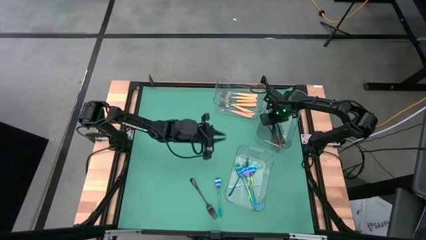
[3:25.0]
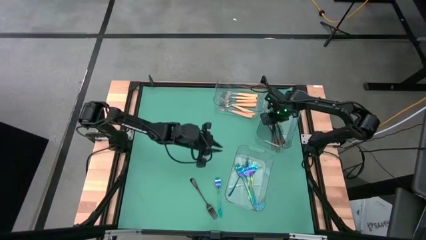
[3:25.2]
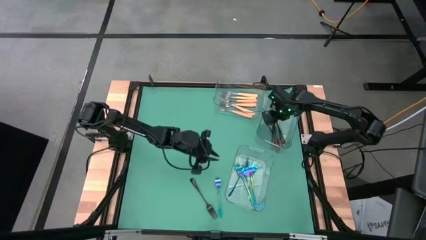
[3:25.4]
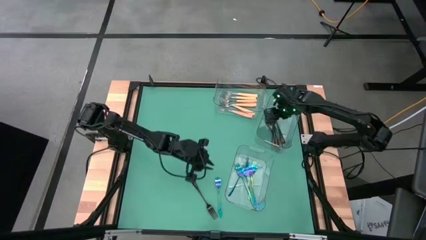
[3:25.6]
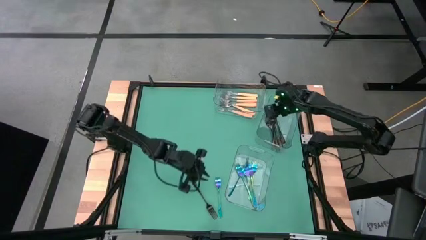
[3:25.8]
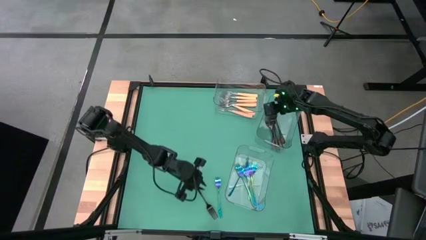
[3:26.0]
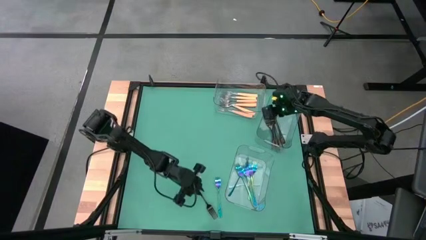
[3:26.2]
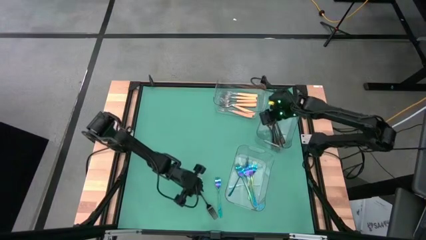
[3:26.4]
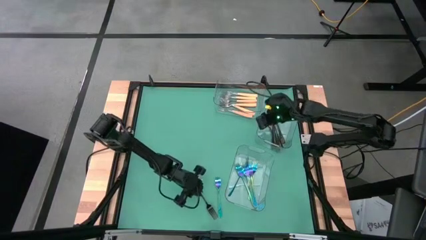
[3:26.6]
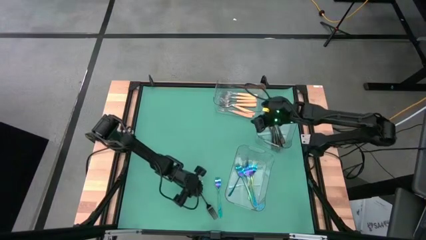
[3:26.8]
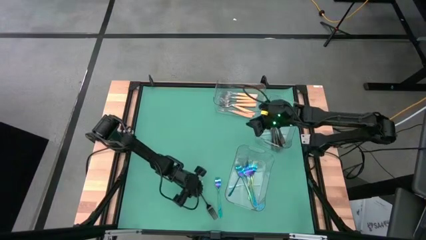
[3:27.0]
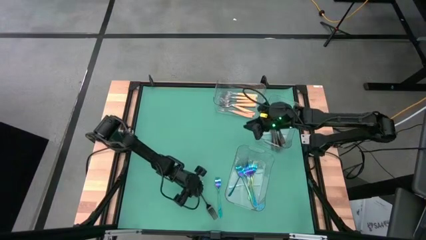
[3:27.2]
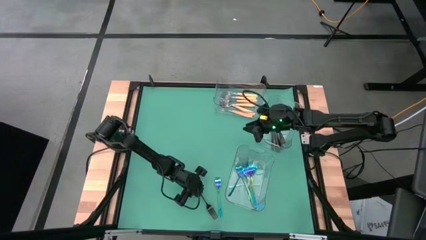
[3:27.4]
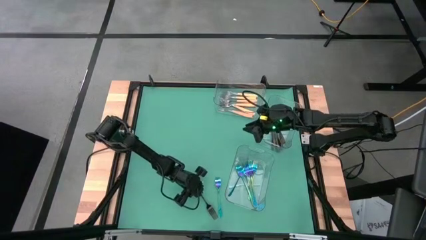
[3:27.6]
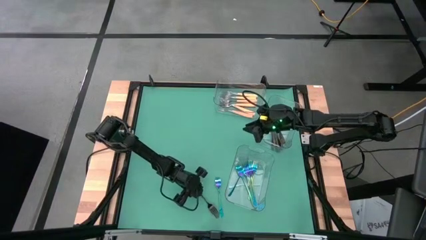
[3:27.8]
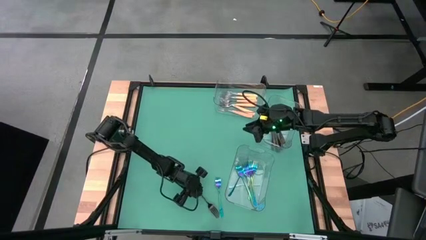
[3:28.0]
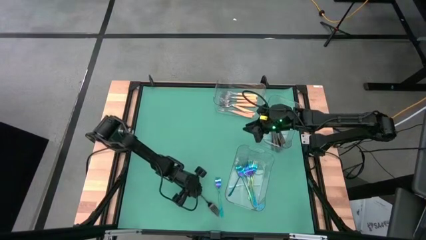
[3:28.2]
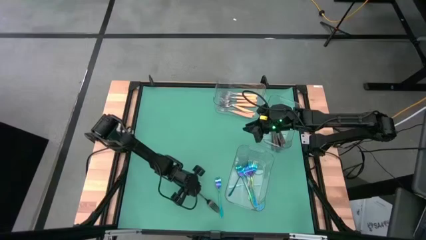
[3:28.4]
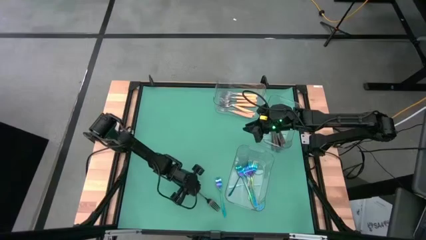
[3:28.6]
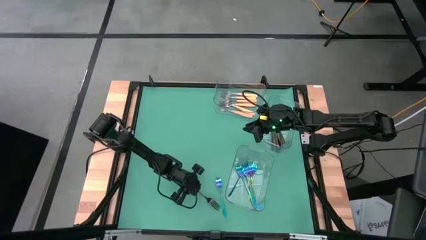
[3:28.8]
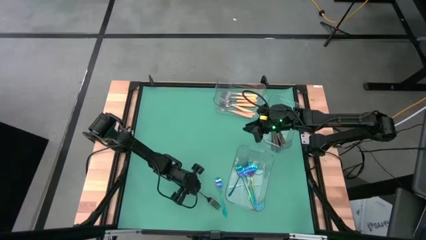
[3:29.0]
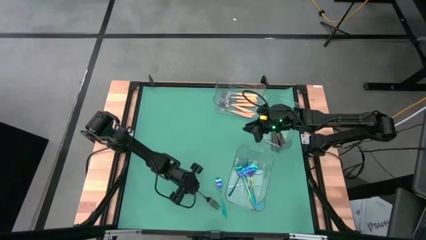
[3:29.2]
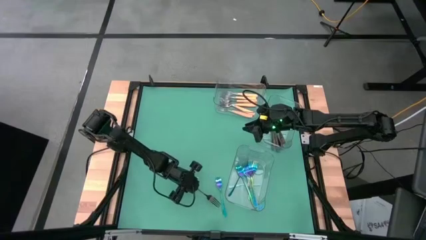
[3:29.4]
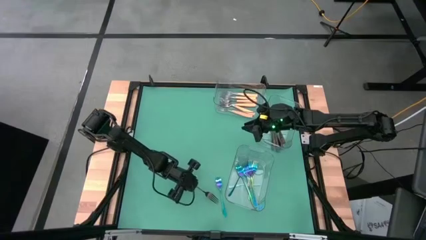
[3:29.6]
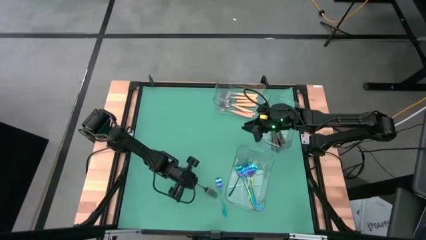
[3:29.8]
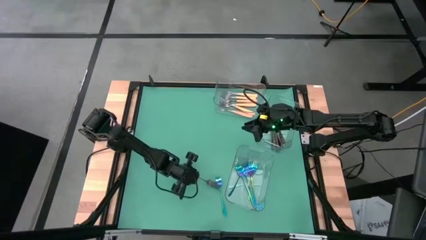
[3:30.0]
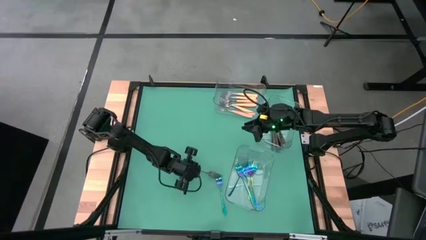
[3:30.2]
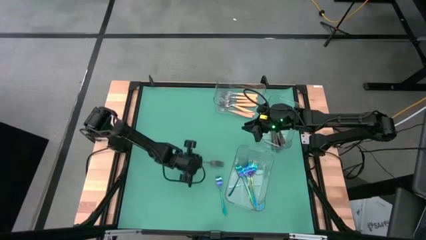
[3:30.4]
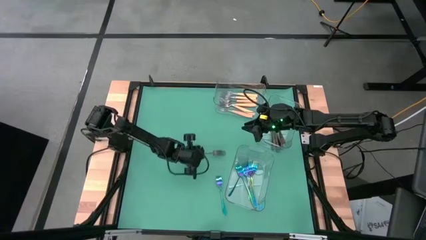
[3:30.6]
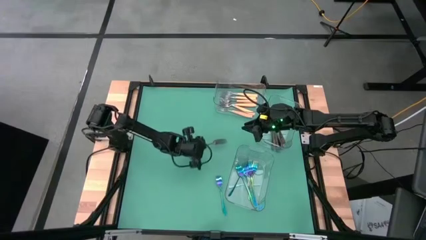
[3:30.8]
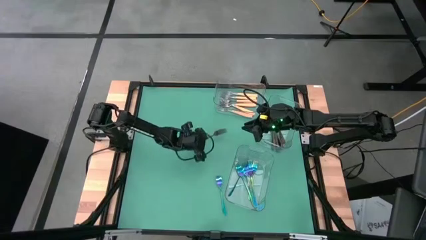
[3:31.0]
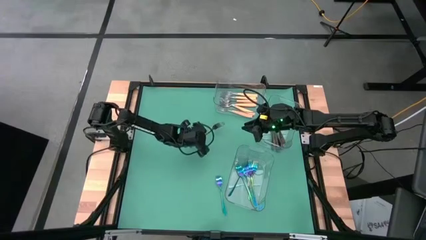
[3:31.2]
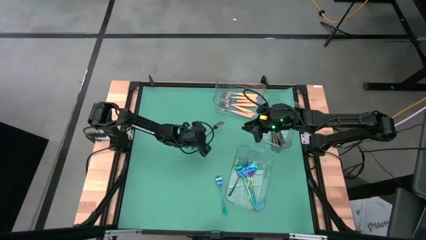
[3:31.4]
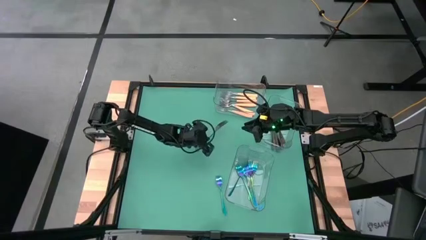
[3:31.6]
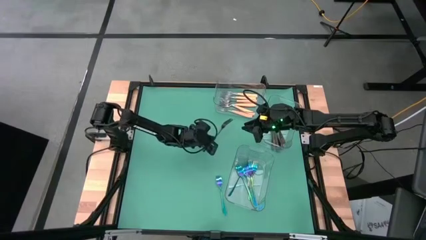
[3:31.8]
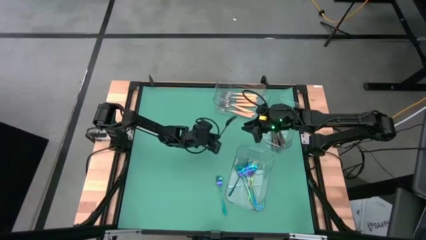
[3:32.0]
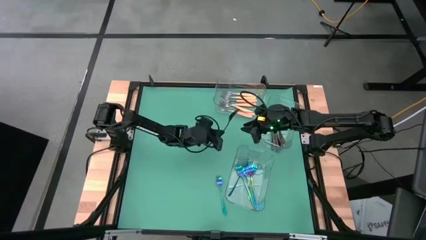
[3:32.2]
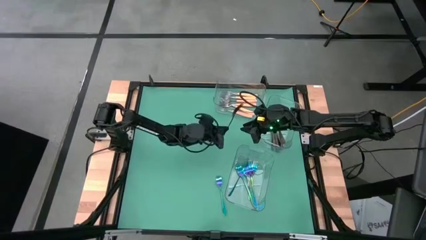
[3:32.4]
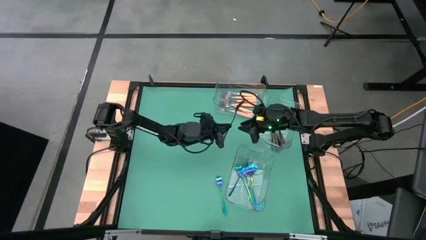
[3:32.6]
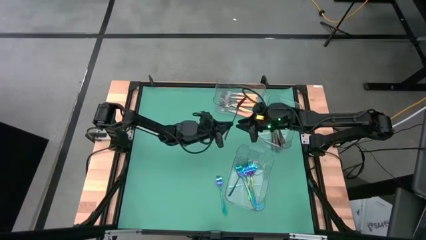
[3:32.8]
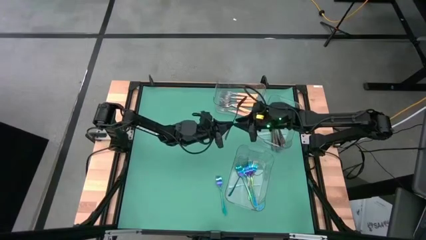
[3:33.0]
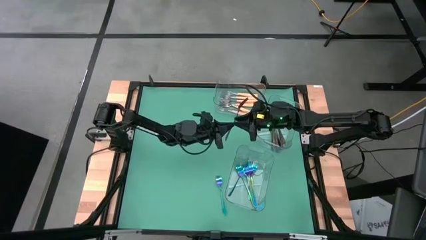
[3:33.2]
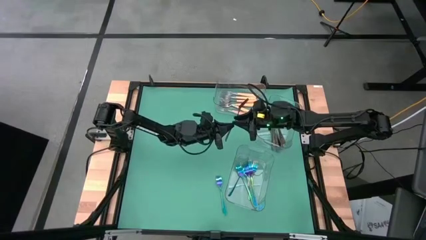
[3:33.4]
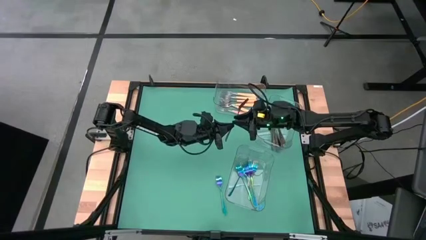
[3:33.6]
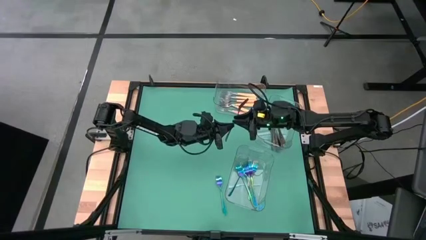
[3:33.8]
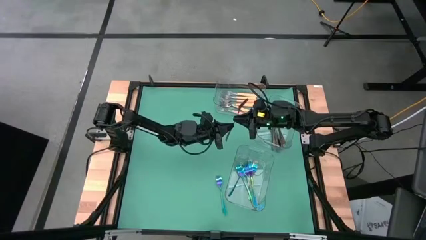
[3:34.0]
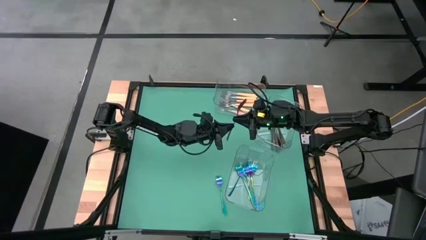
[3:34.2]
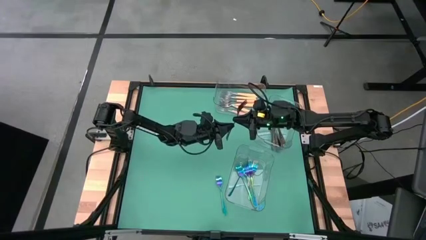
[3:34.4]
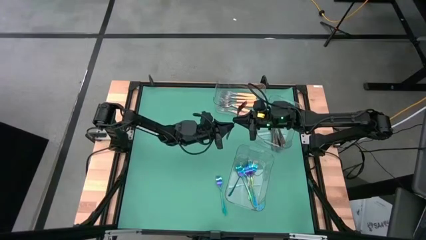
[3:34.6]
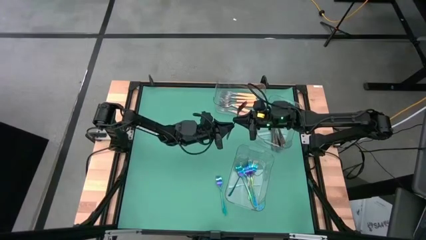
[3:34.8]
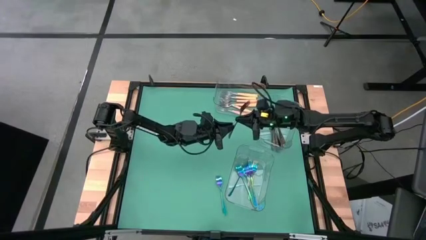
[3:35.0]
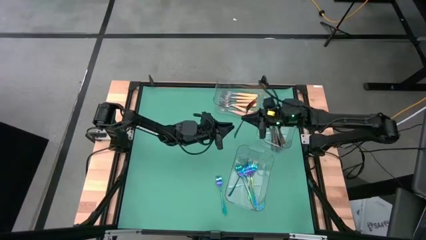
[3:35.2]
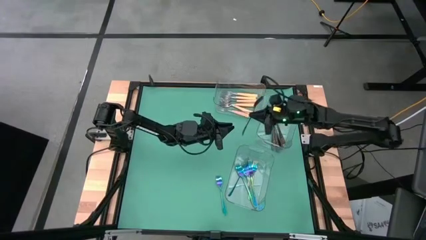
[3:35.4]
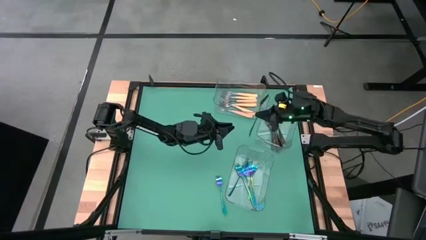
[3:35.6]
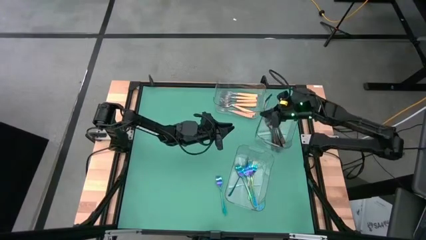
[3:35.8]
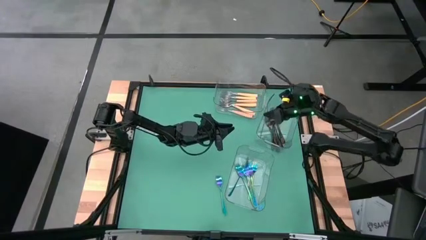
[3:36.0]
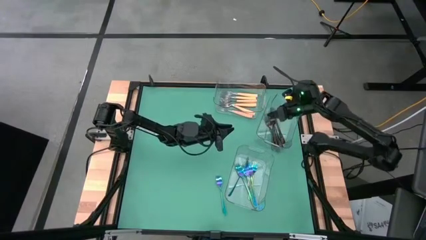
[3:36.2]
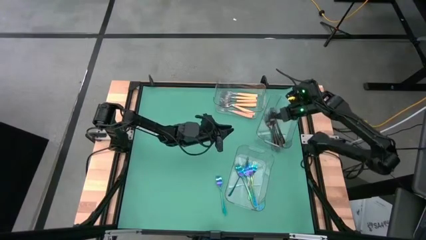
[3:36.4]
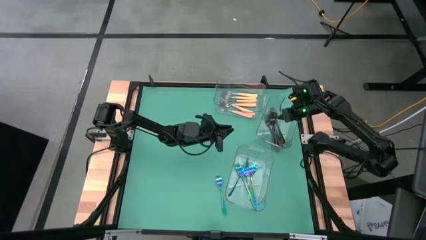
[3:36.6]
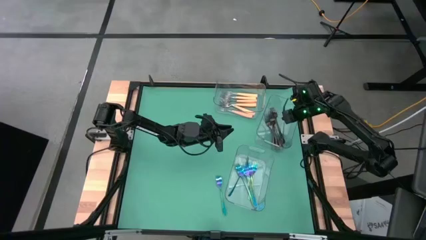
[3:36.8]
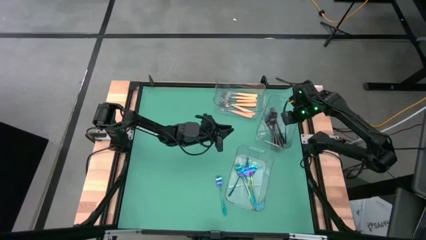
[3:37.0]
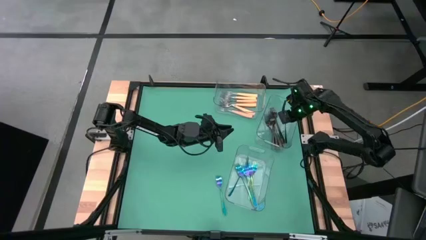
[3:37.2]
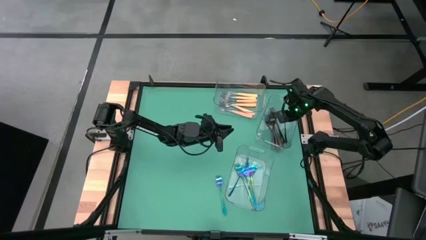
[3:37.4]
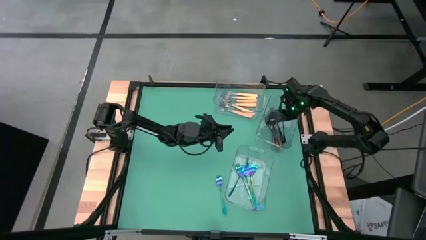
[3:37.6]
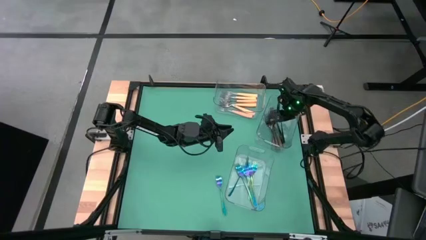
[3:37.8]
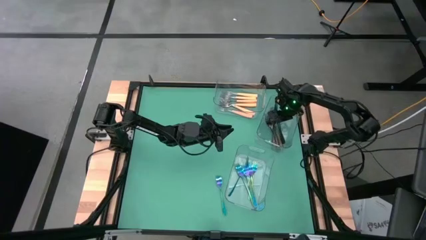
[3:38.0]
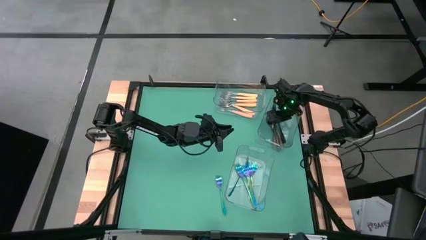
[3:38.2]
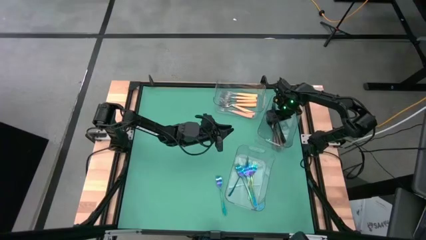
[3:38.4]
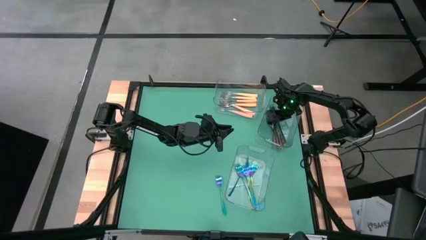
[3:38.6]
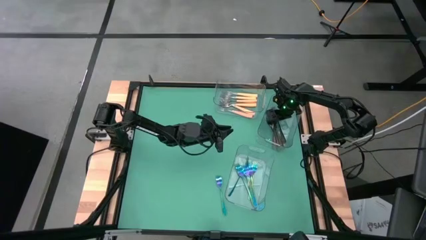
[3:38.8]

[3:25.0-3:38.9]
Task: Sort silverware by color (type)
Put the black fork into the center transparent bin

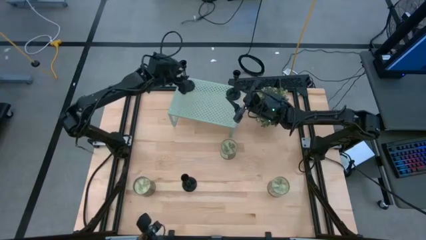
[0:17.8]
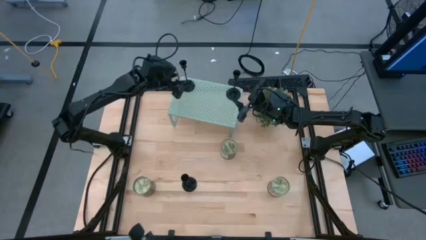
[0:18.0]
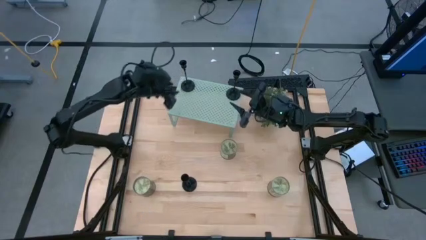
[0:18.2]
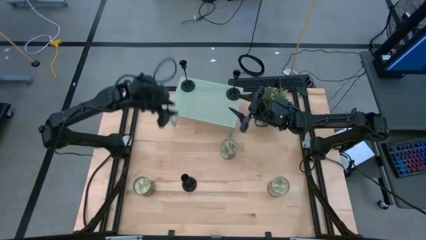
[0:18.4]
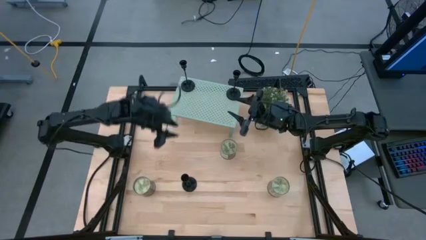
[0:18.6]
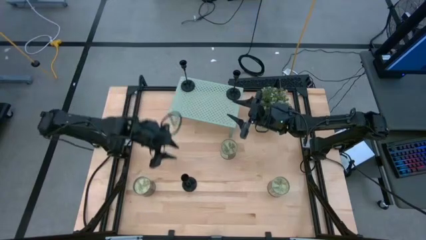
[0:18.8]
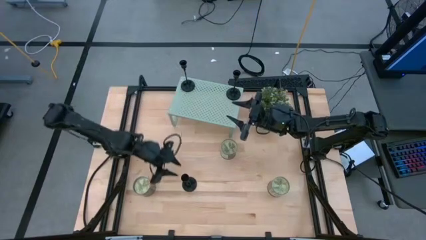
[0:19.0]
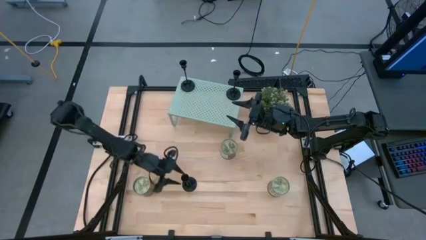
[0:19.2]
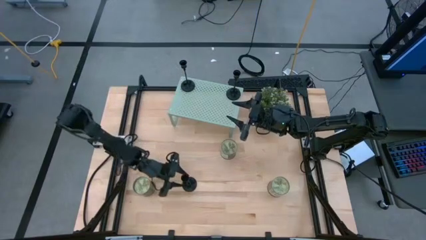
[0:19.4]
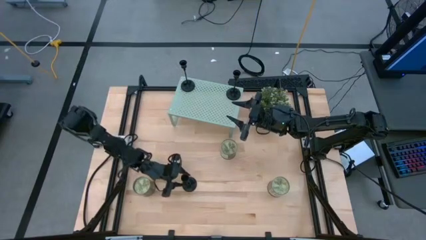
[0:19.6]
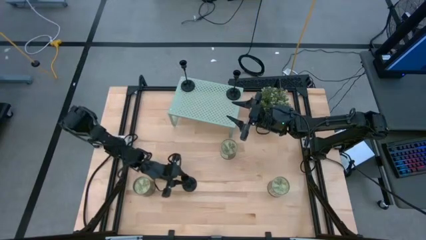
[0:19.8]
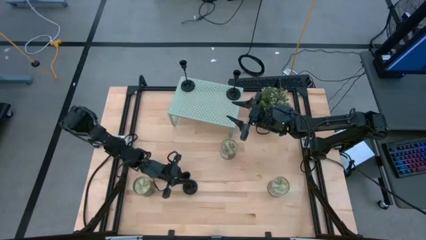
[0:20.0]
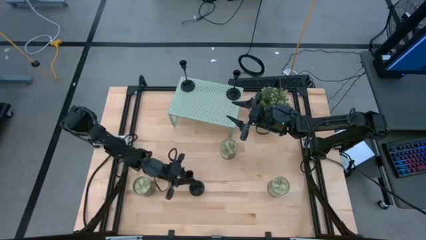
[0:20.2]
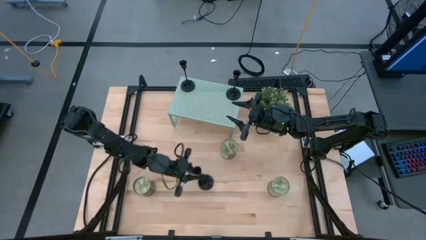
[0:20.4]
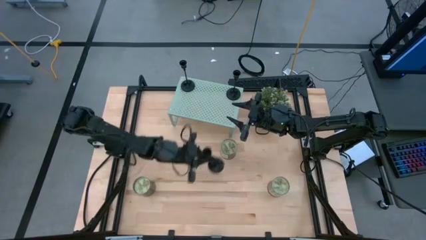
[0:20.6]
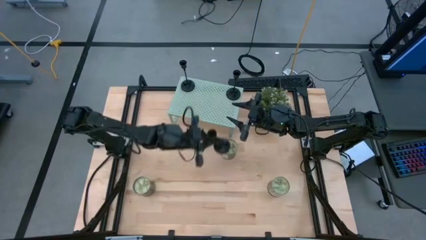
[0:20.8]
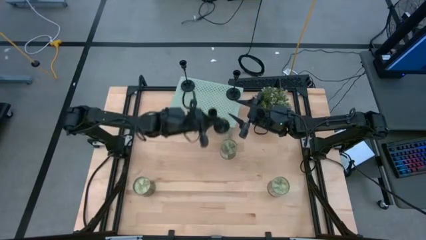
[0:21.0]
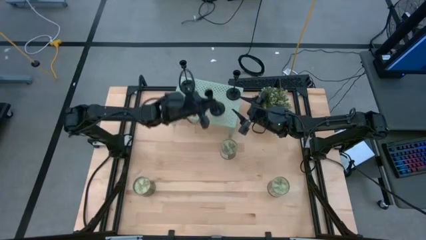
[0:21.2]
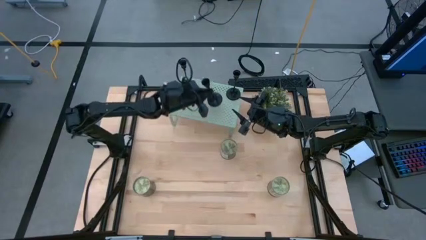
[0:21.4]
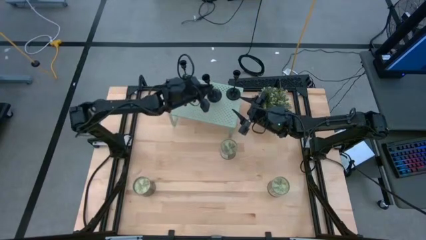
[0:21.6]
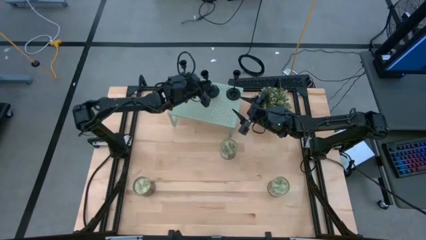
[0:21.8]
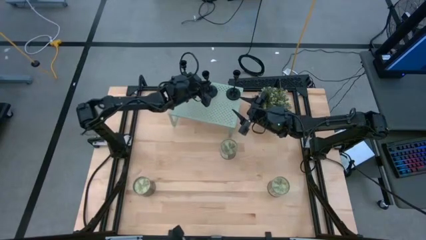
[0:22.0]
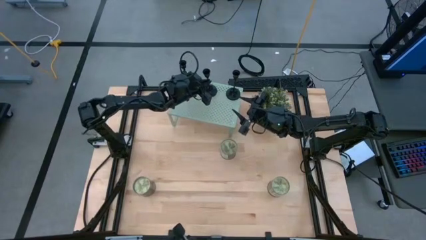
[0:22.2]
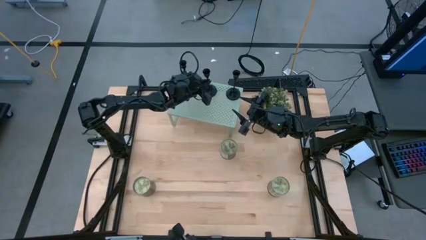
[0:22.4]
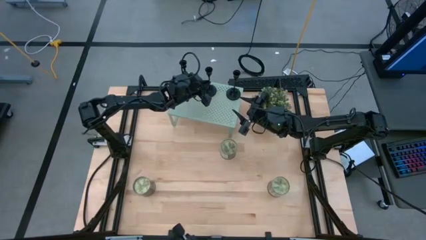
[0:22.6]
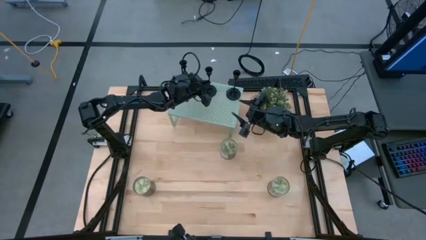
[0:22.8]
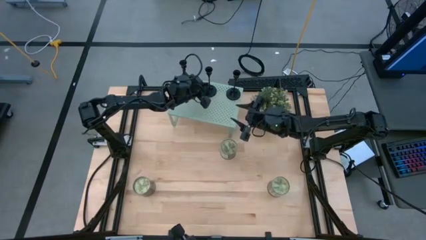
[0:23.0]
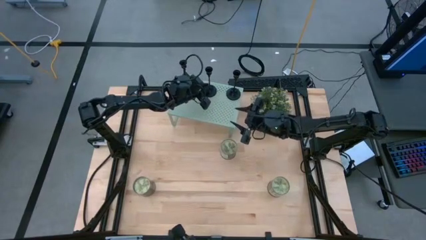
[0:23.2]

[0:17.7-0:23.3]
Task: Pick & Place candle stick holders
Put the black candle holder on the shelf
